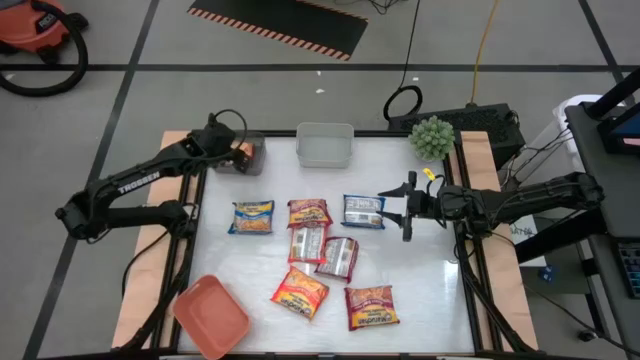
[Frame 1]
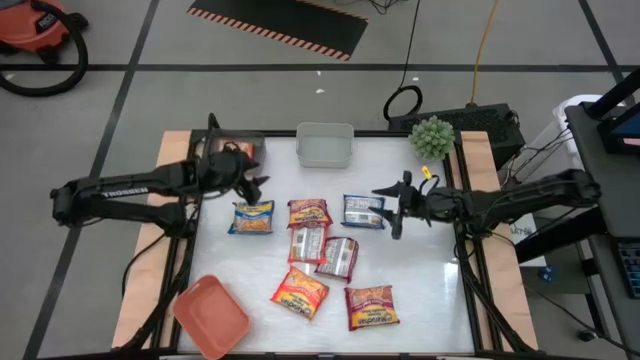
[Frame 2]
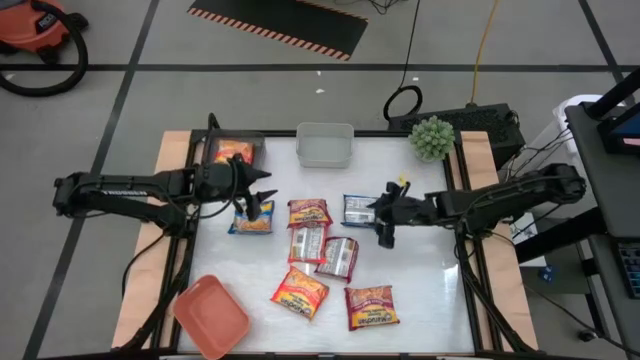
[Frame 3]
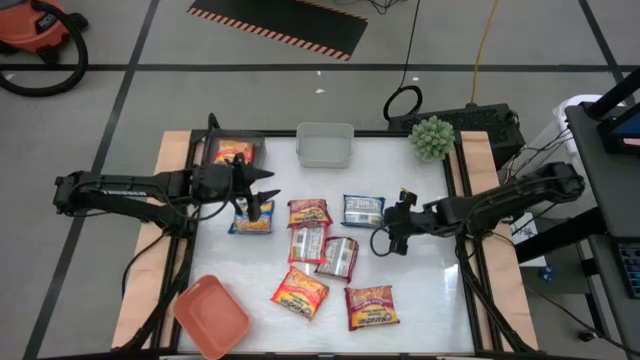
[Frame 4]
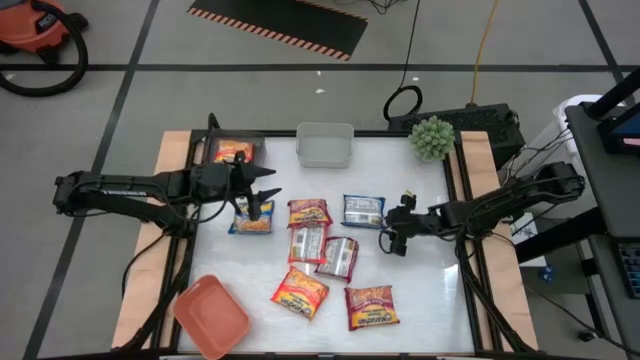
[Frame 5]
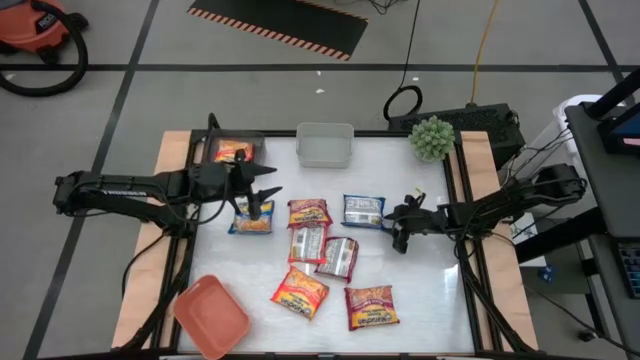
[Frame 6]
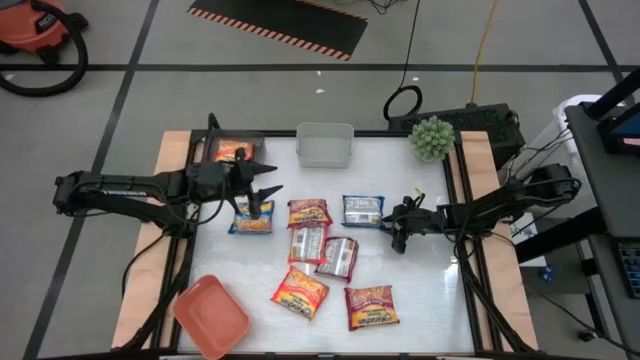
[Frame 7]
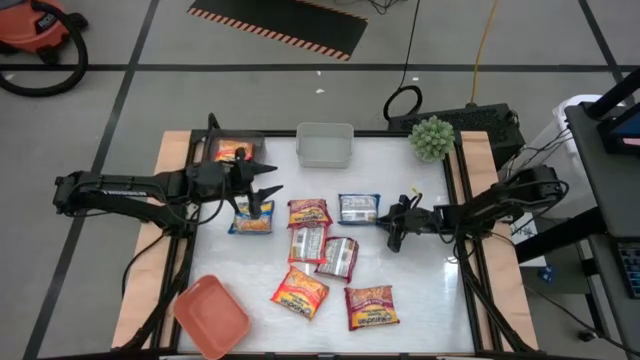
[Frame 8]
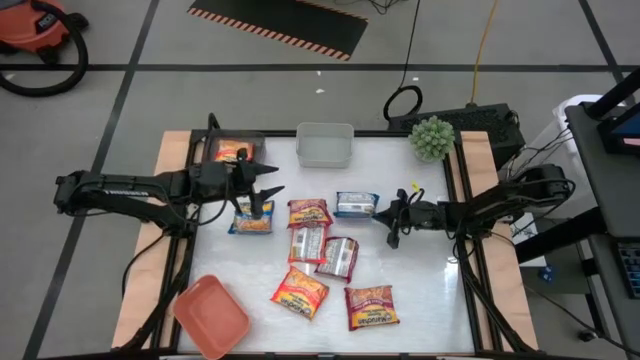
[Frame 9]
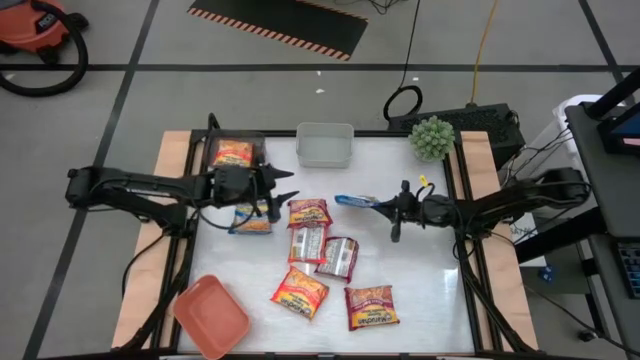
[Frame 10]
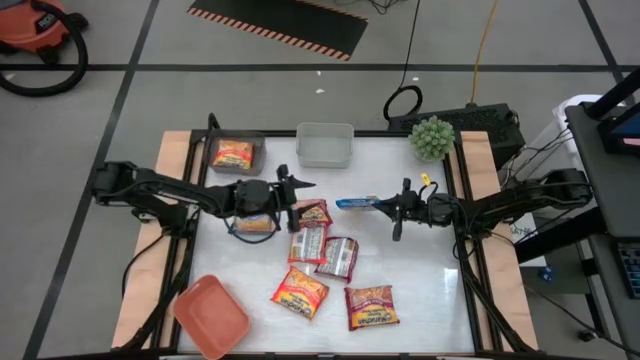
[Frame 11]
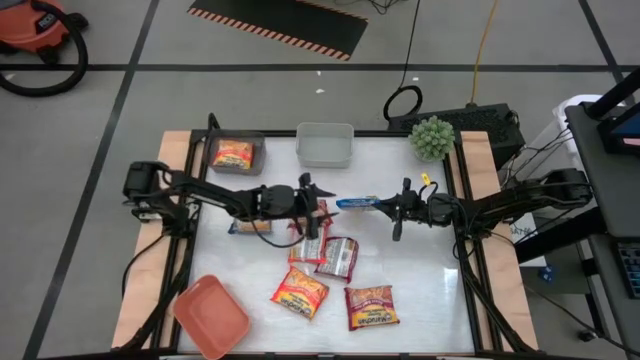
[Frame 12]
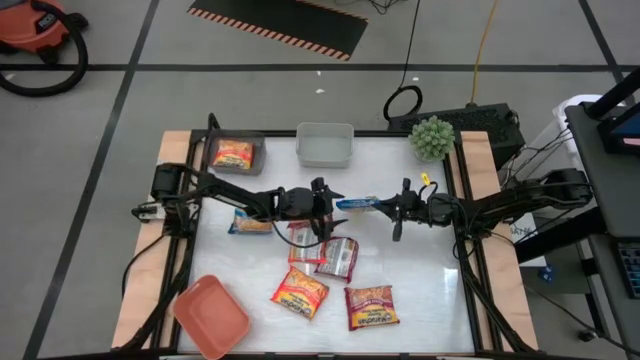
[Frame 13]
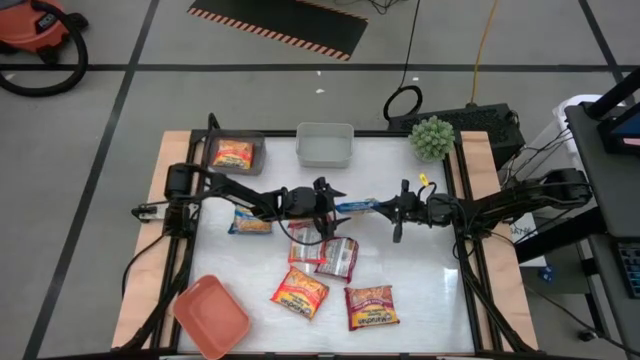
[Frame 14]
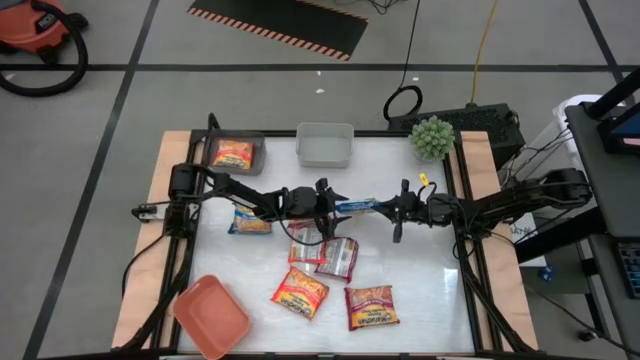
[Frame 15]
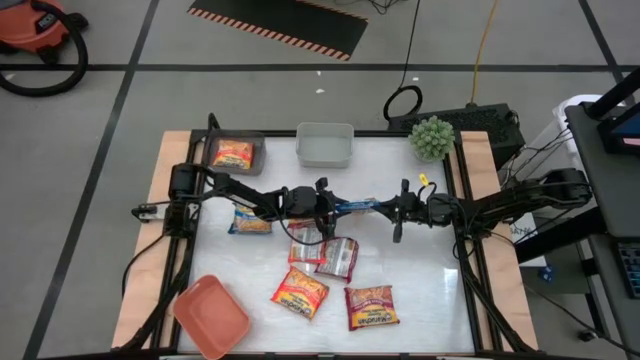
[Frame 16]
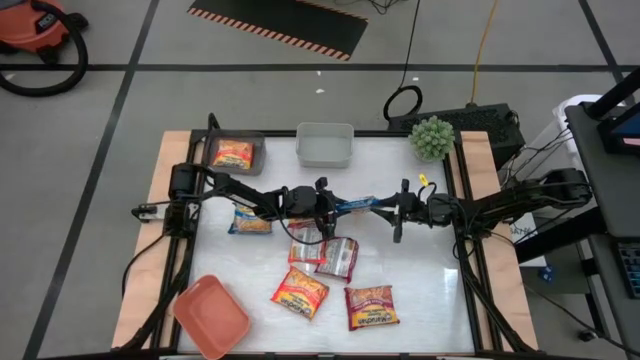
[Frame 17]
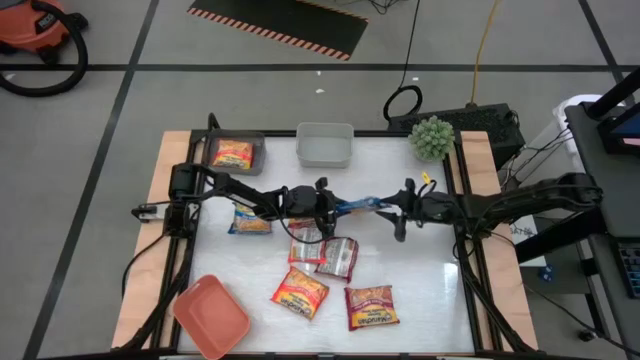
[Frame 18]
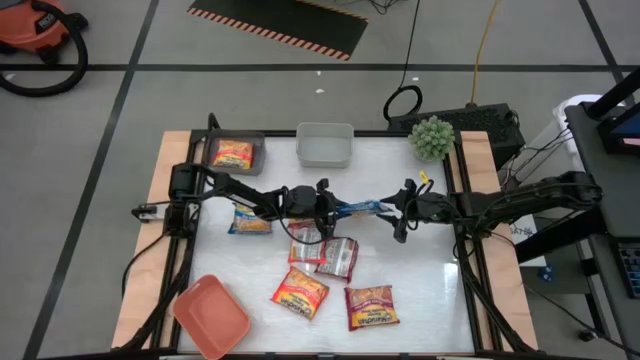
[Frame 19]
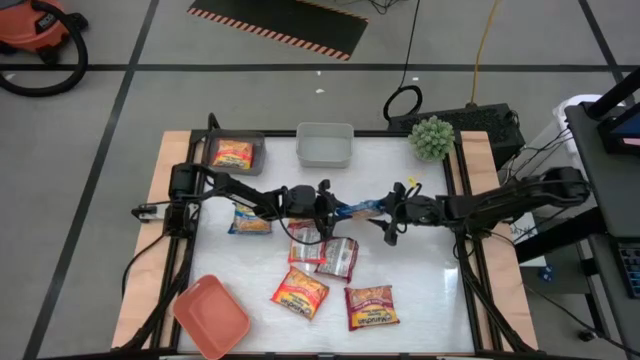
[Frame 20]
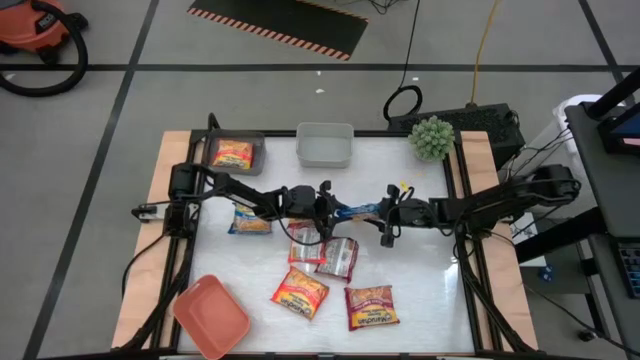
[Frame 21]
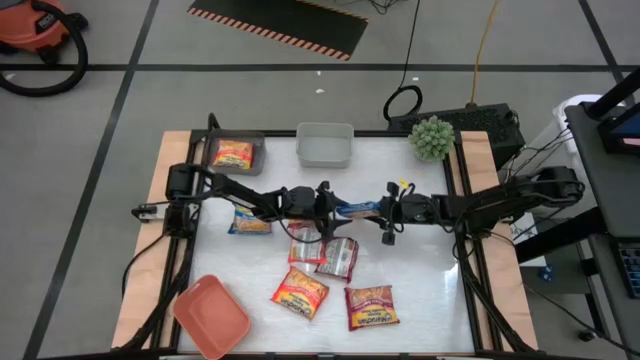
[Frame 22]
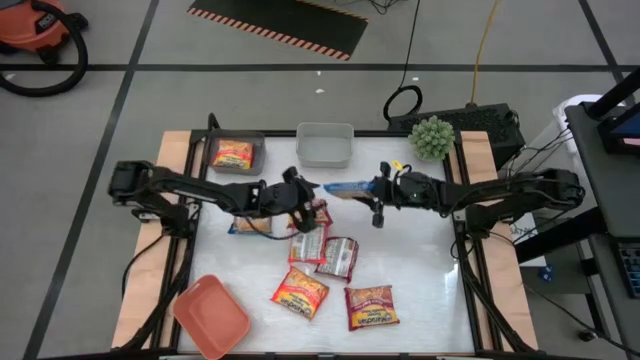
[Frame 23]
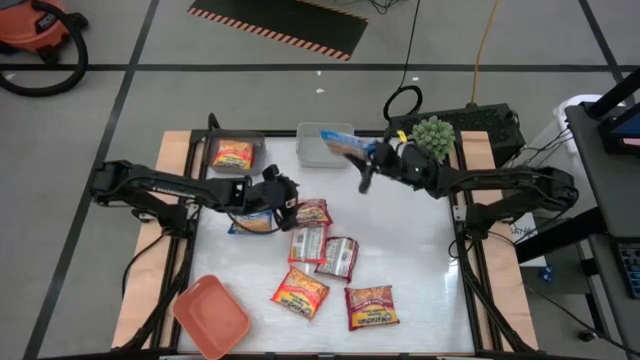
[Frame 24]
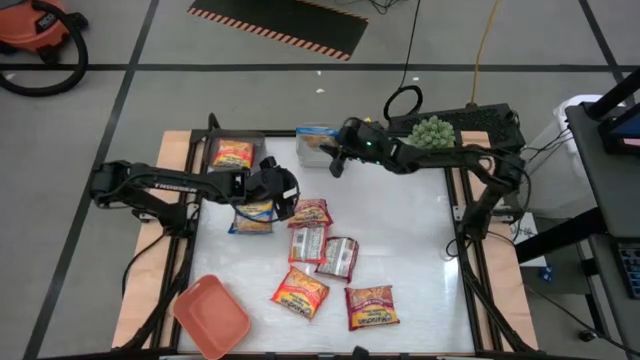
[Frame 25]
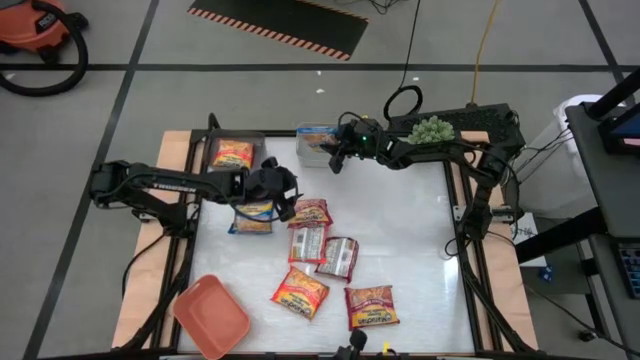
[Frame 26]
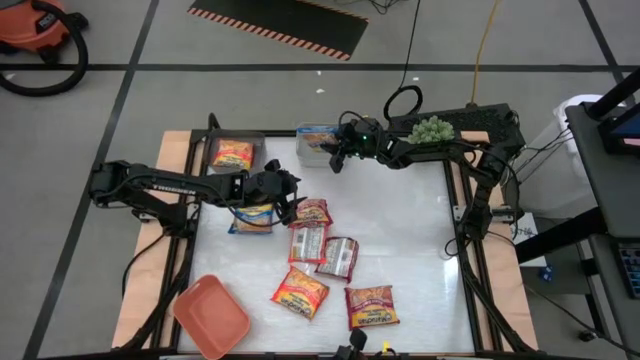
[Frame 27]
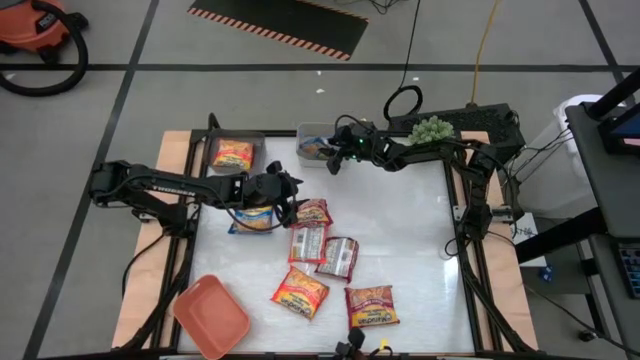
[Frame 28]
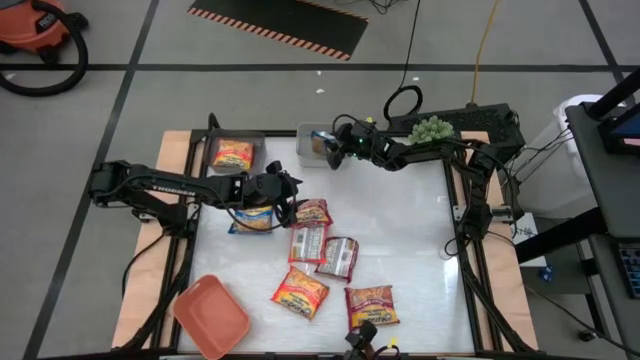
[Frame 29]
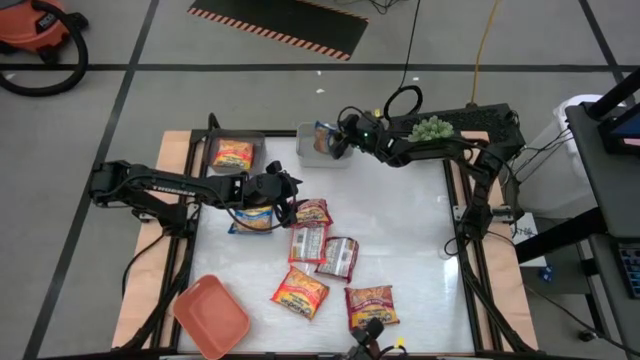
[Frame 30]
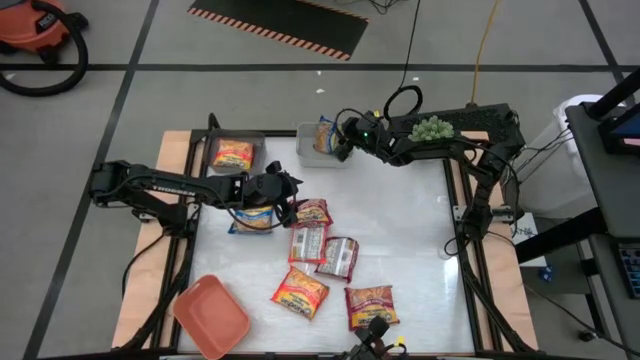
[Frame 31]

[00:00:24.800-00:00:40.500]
Task: Sort Maruchan noodles
Put the right blue noodle pack into the gray bin

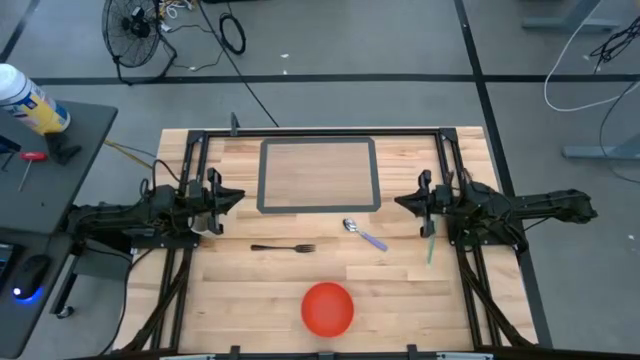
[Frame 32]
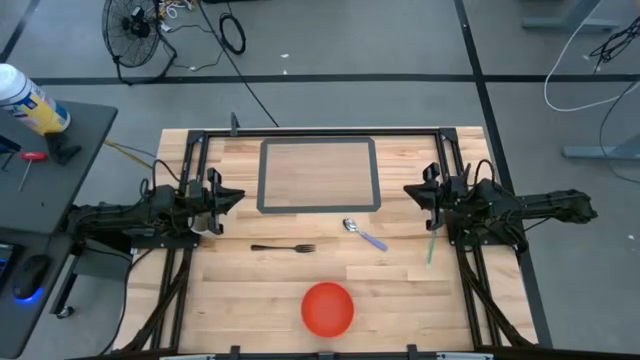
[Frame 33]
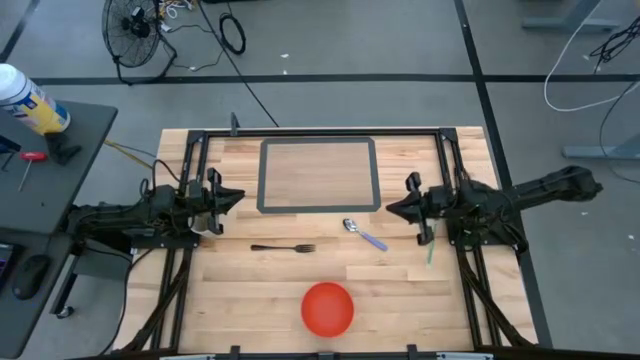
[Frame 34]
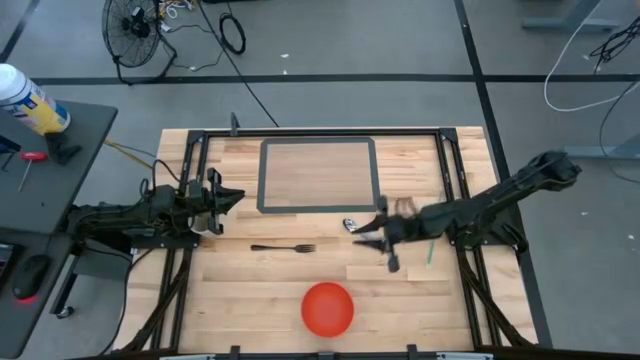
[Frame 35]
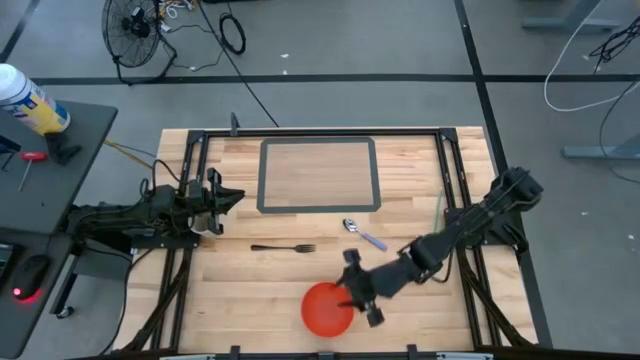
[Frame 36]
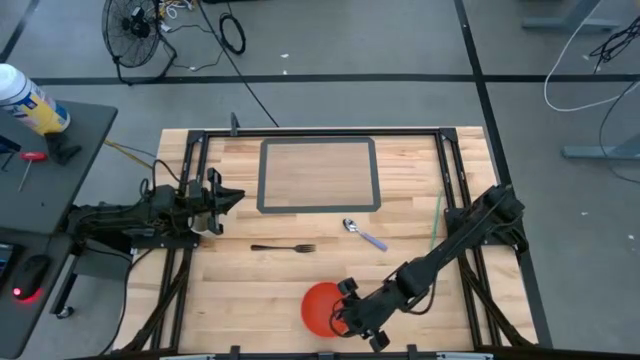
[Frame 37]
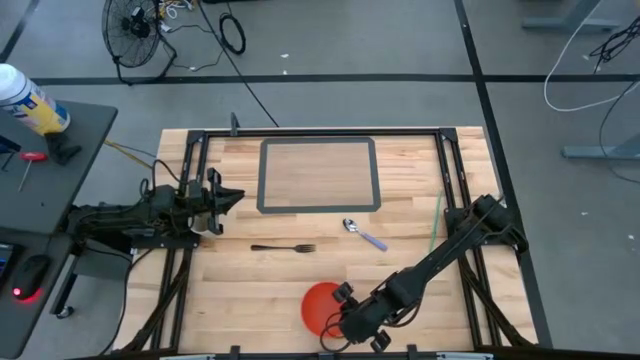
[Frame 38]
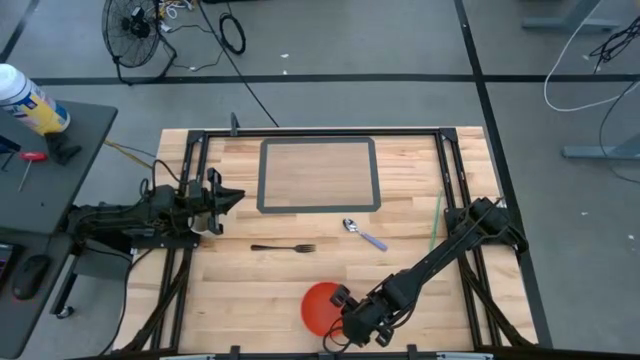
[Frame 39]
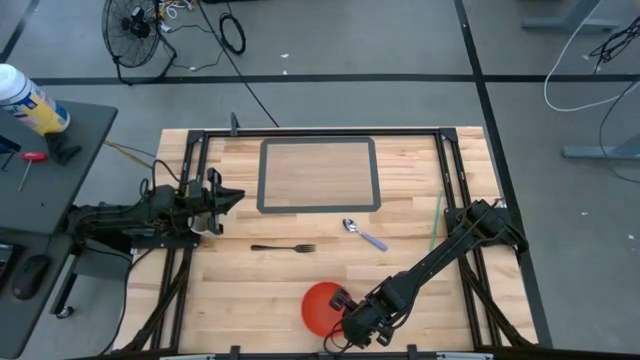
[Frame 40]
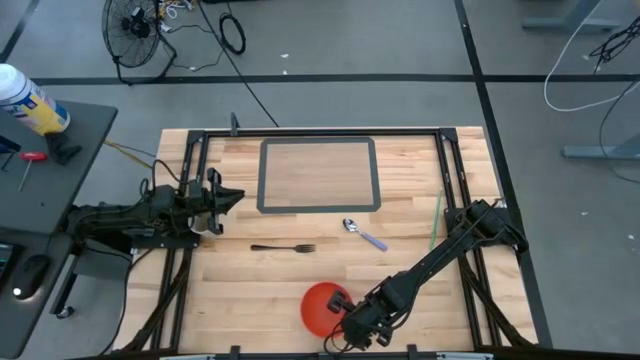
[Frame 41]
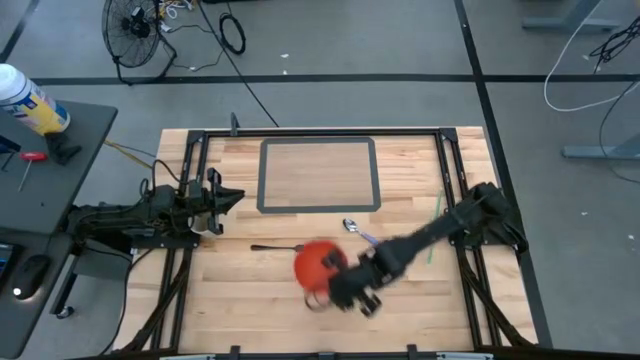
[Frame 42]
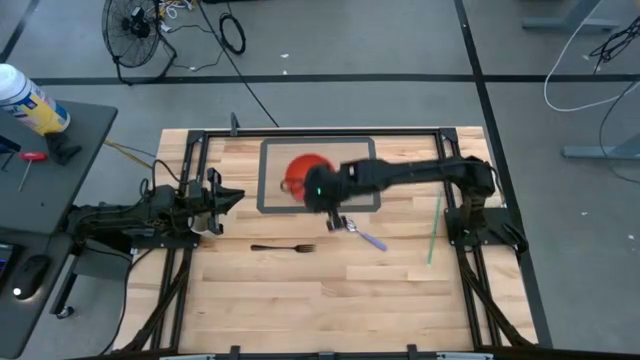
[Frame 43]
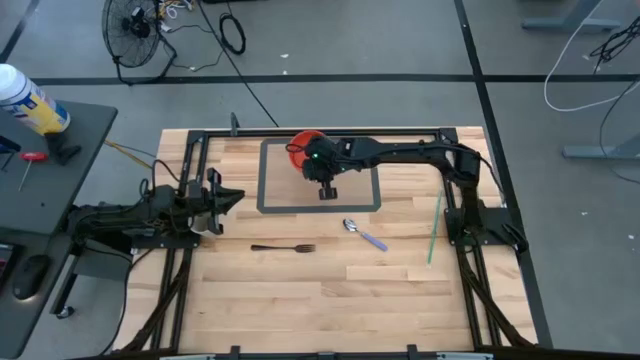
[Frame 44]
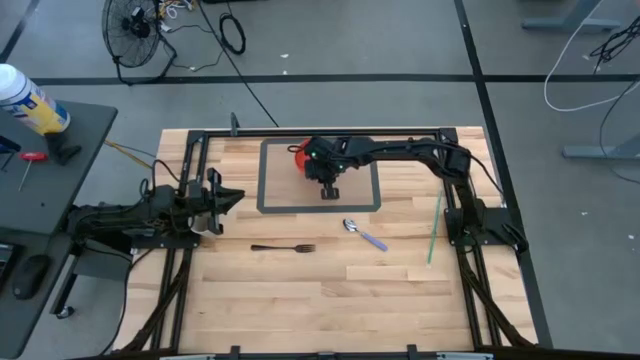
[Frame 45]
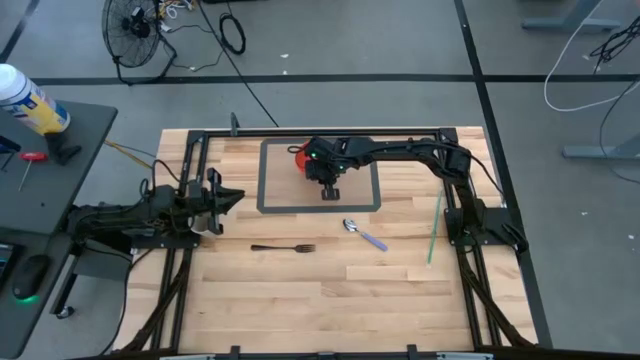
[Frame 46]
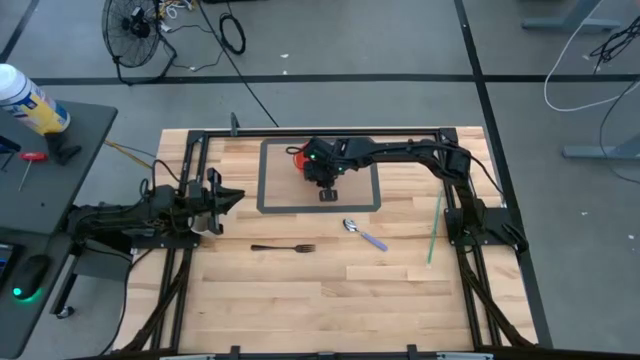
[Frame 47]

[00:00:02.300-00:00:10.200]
Task: Pick & Place Utensil
Put the orange bowl in the center of the transparent mat
